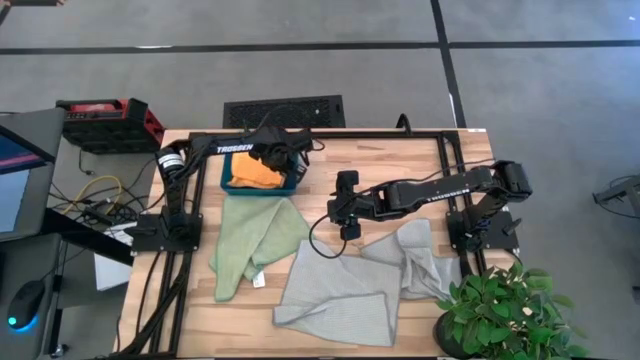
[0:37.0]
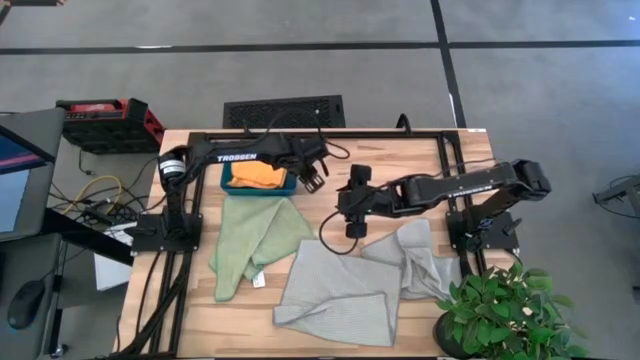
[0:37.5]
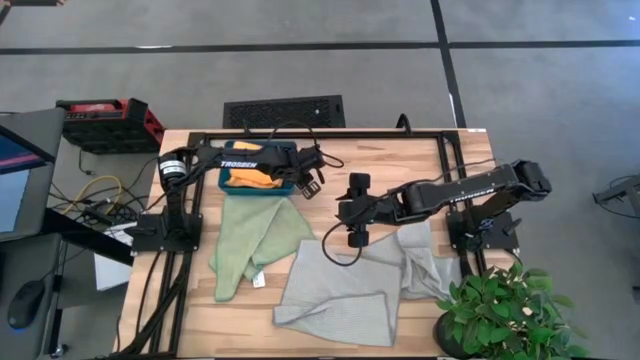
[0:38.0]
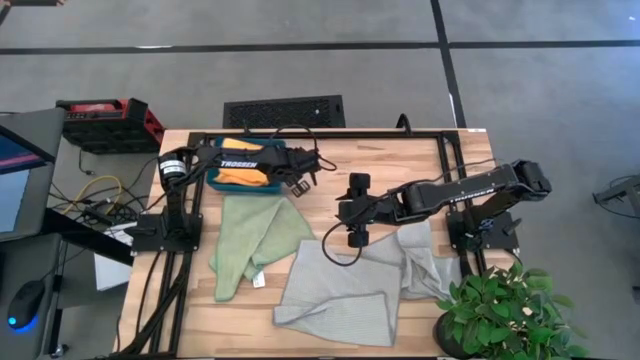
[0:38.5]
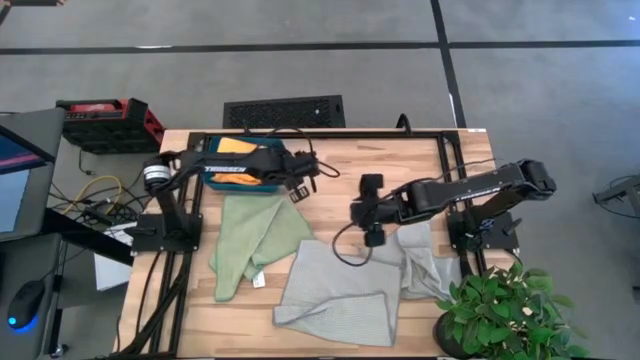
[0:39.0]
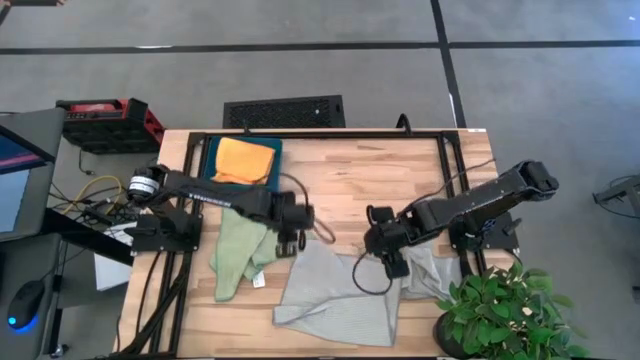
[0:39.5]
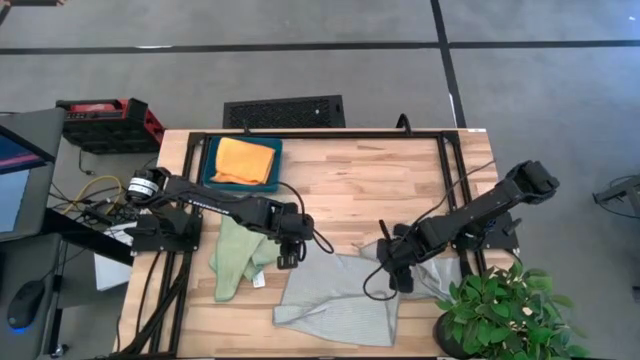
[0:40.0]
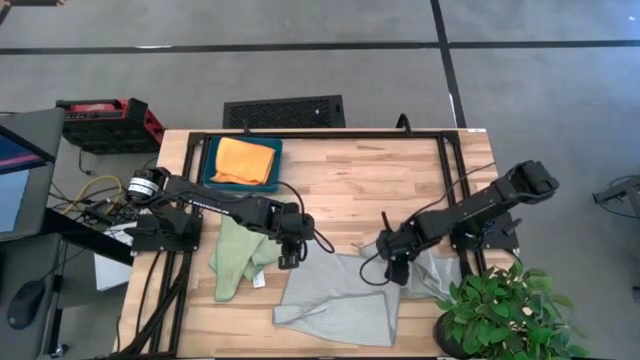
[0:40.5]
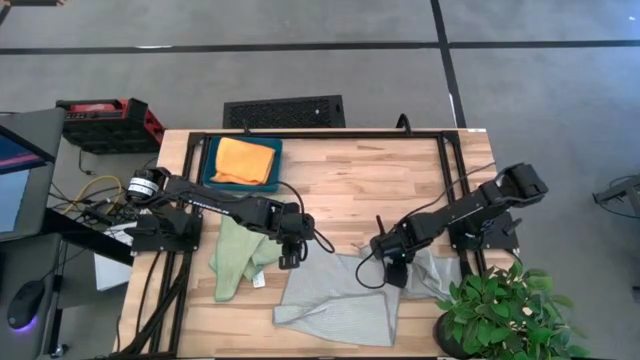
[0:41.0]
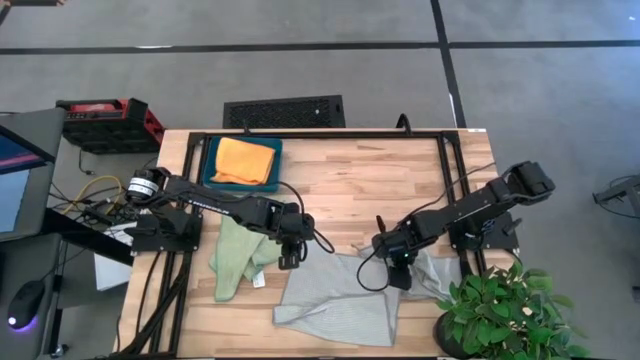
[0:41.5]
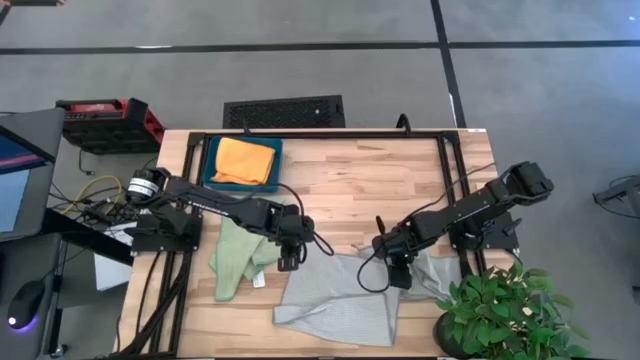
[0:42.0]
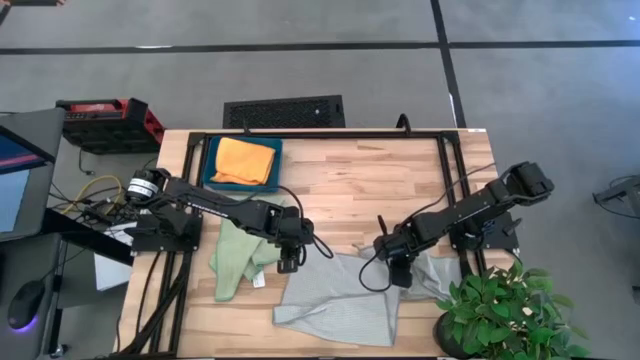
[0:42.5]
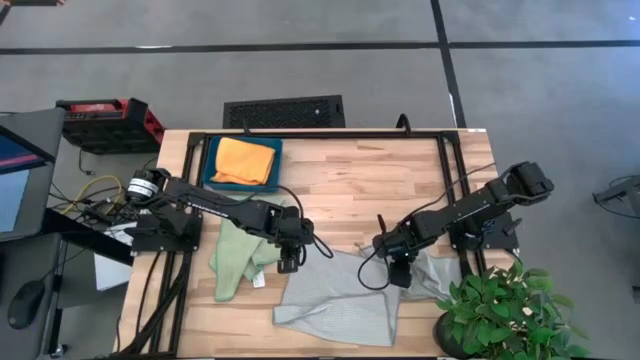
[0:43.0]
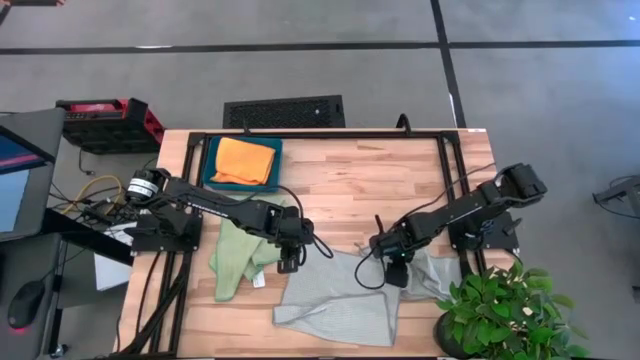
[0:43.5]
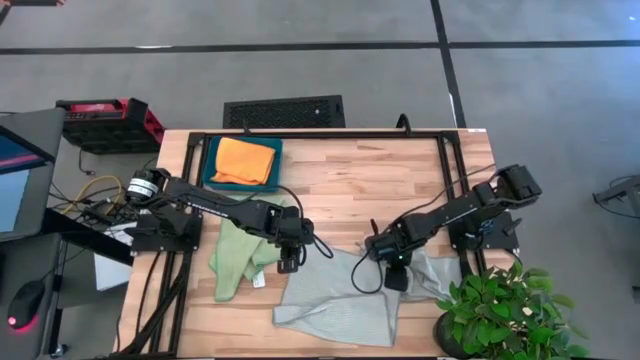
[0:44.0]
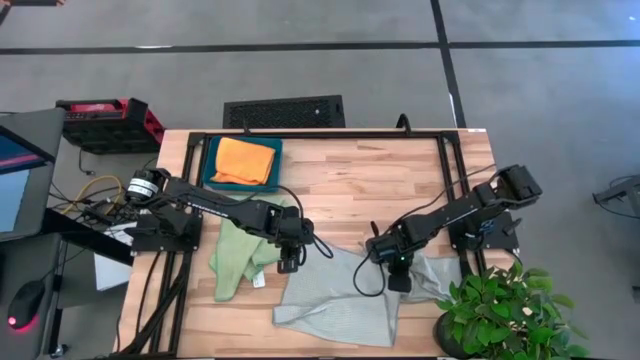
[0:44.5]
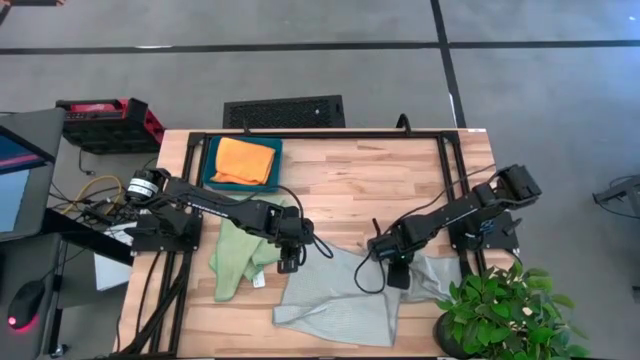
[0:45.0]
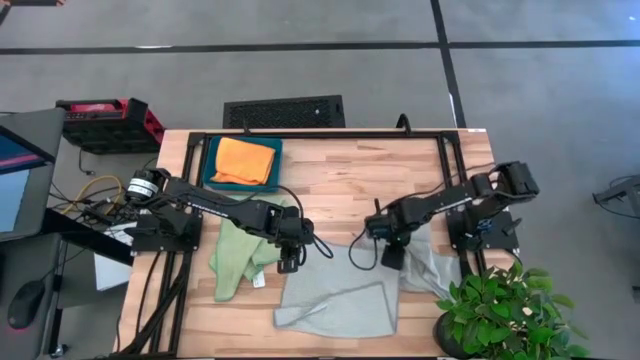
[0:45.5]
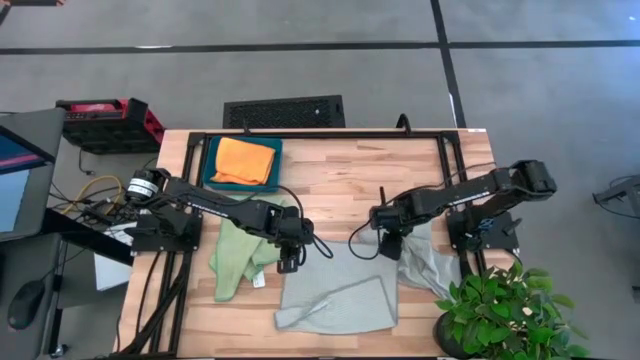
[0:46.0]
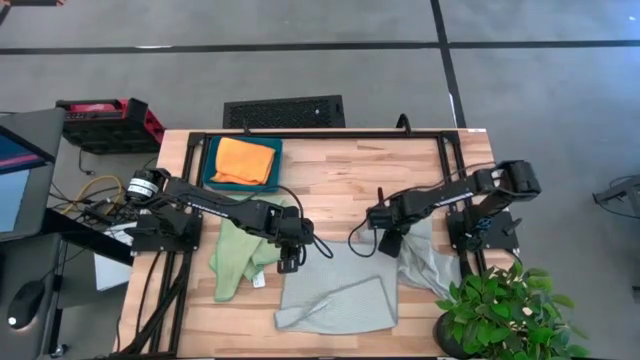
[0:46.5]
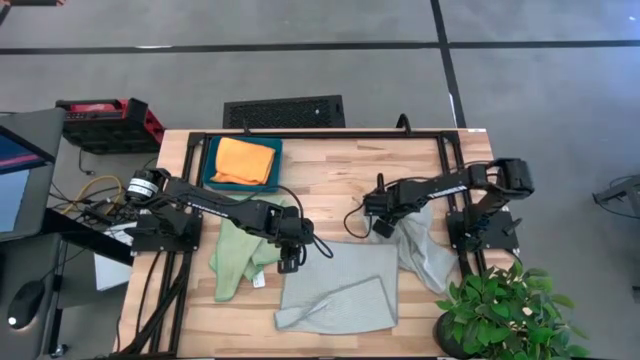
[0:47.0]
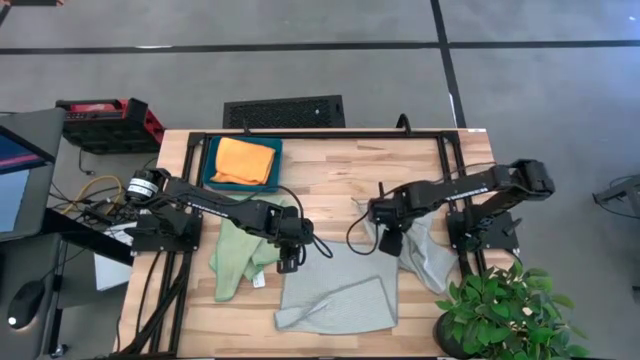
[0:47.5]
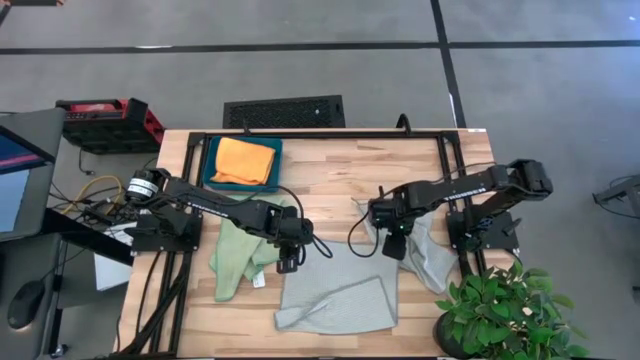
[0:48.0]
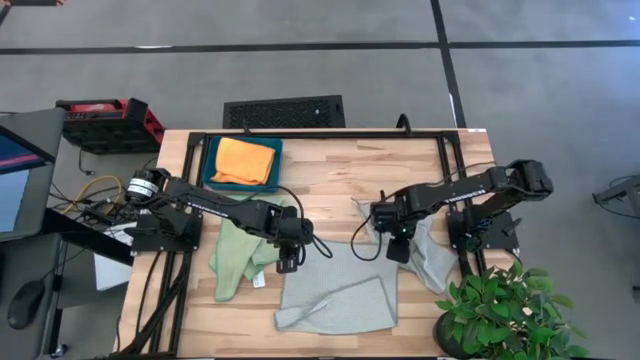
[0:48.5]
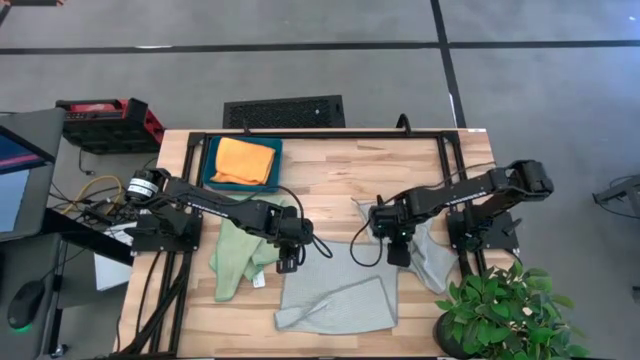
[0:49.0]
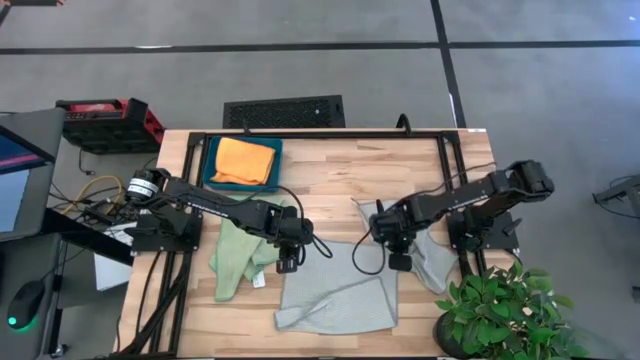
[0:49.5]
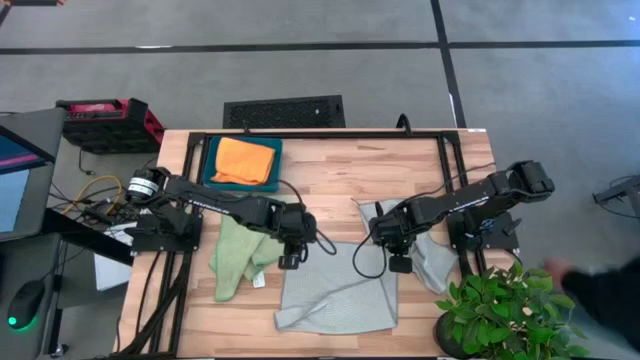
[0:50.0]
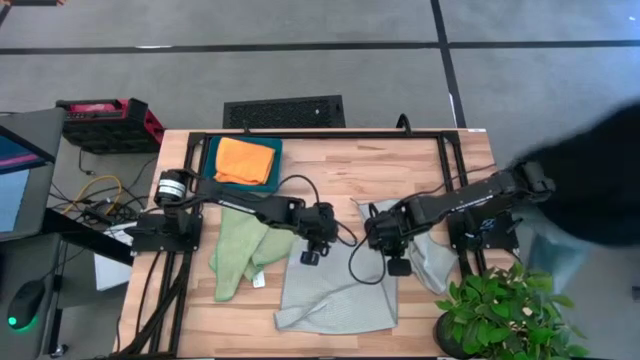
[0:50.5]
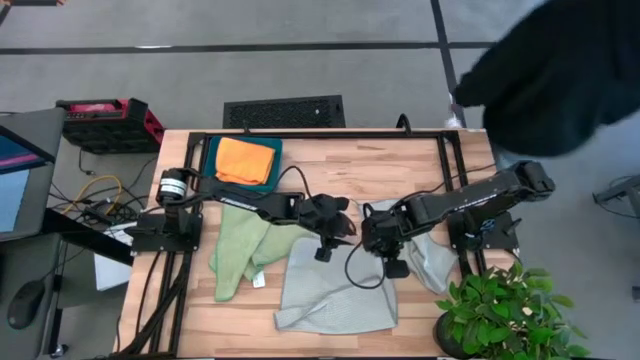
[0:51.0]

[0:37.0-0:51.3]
Task: Fold microfiber towels
Fold the left gray towel

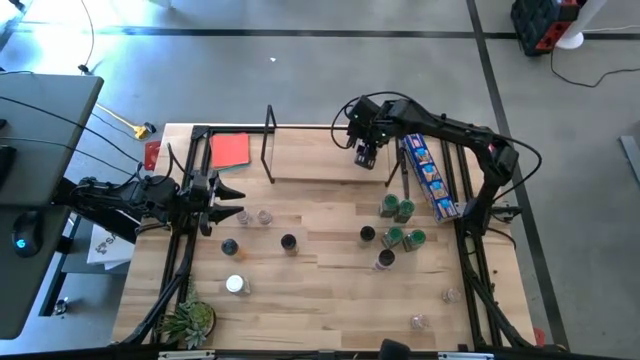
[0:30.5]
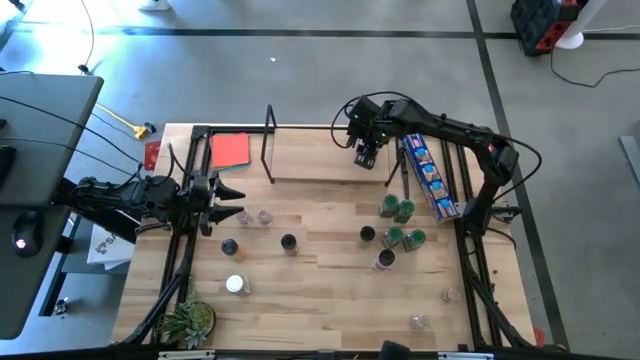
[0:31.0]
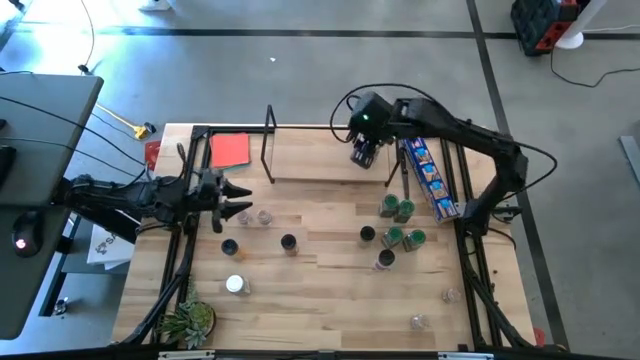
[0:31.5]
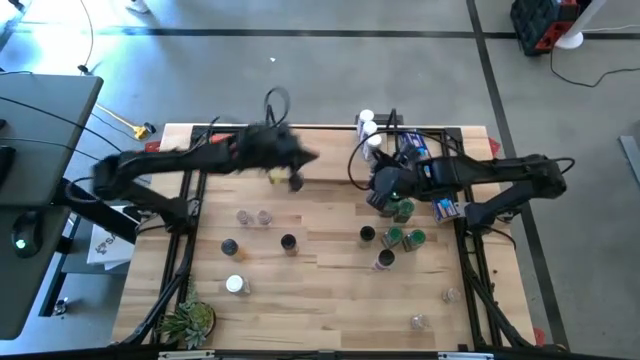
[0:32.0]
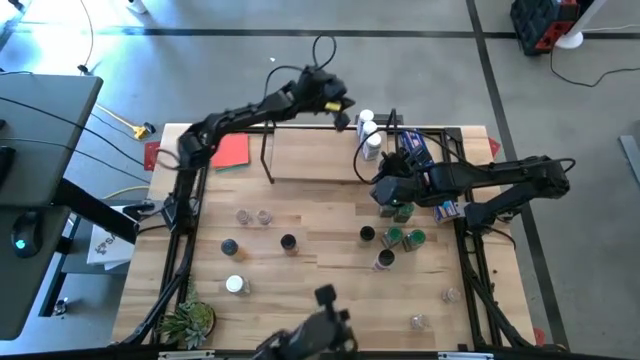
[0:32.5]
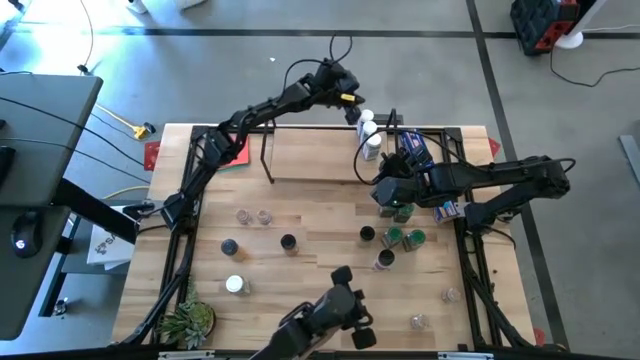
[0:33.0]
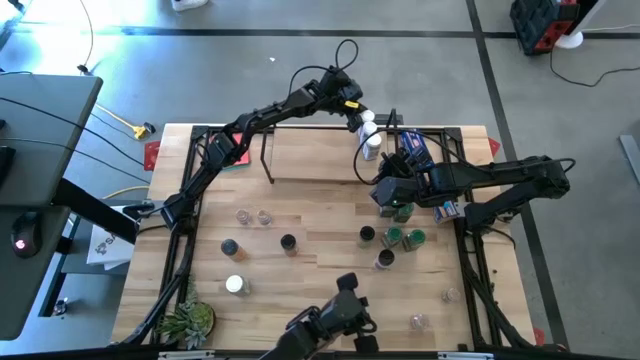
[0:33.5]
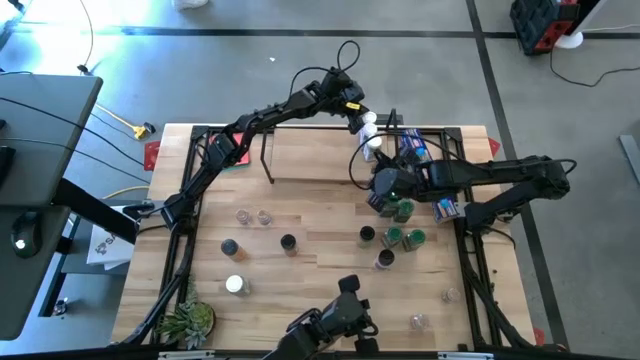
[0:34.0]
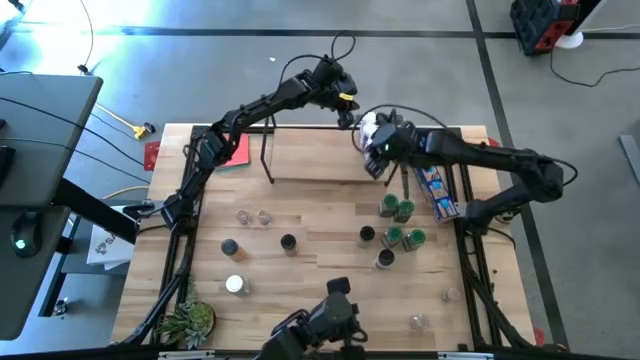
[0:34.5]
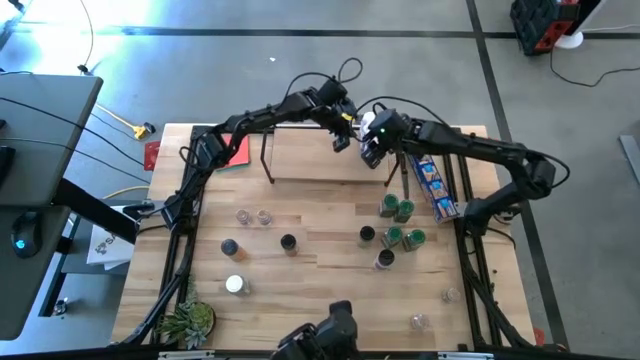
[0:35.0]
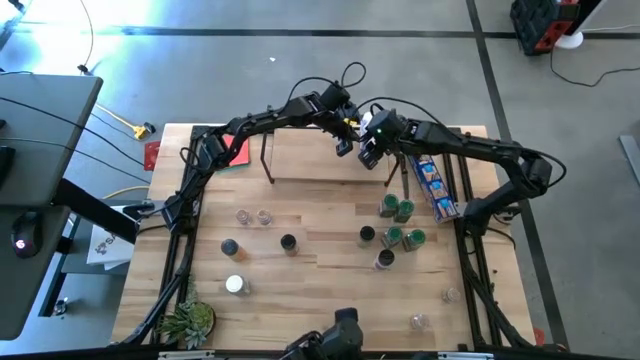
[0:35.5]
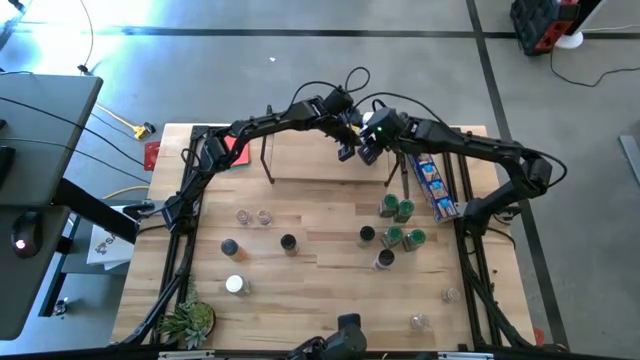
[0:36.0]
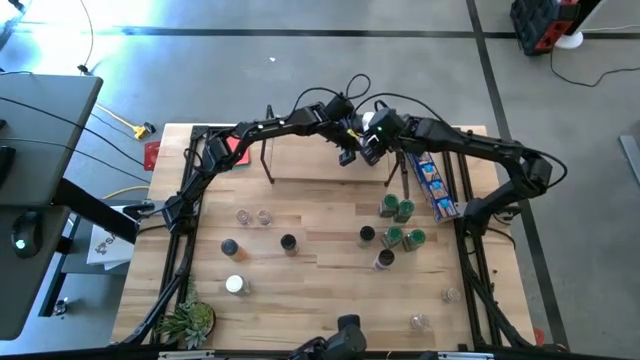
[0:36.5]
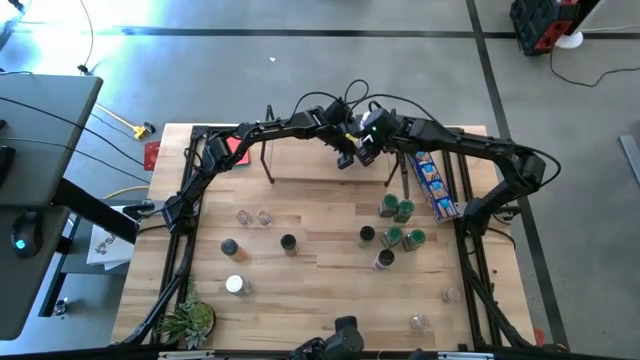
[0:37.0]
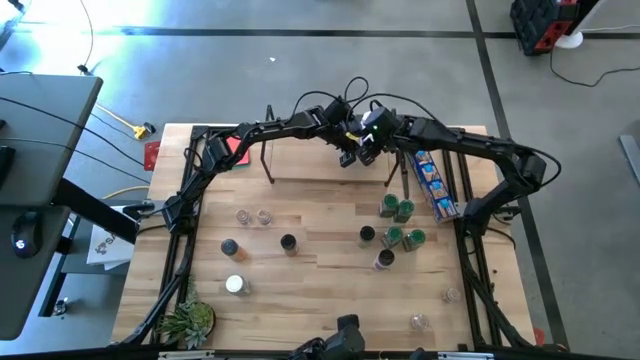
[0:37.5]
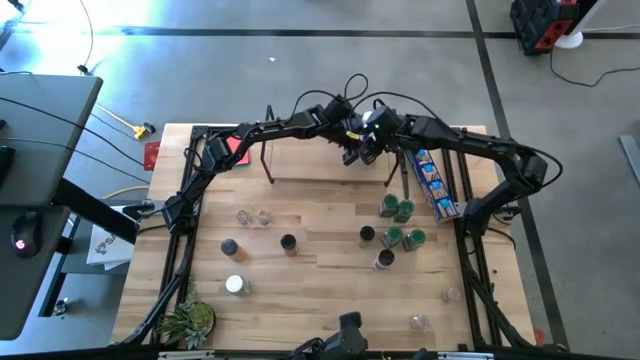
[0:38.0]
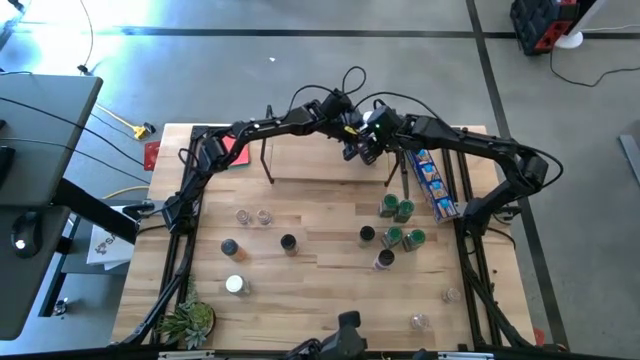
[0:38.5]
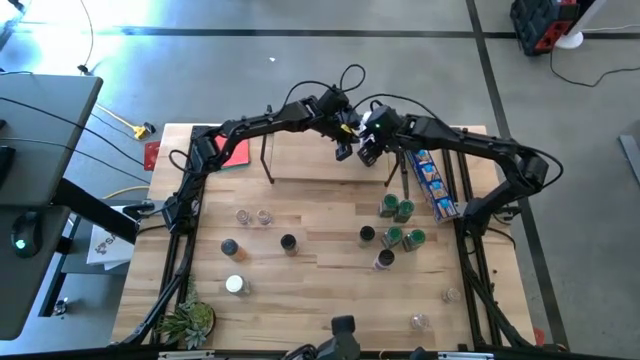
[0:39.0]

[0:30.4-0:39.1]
Task: Shelf spices
Adjust the white seasoning bottles
